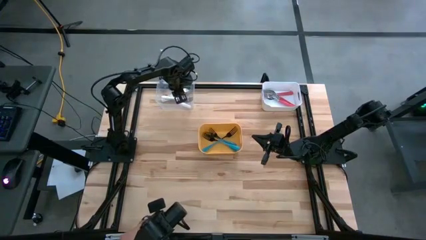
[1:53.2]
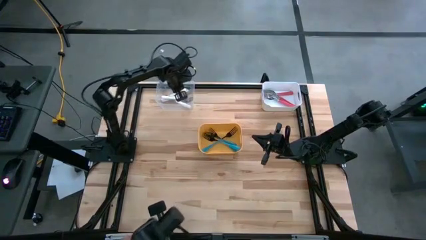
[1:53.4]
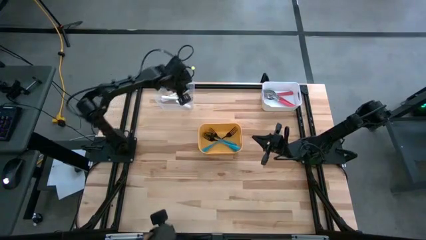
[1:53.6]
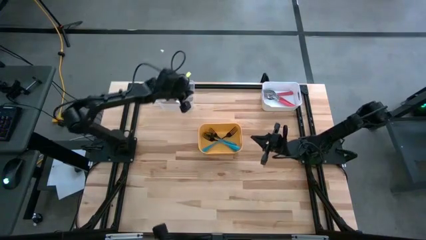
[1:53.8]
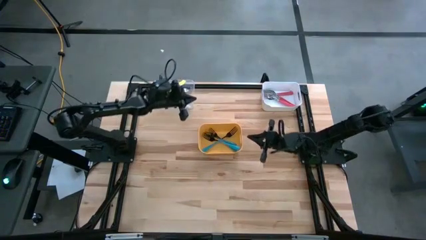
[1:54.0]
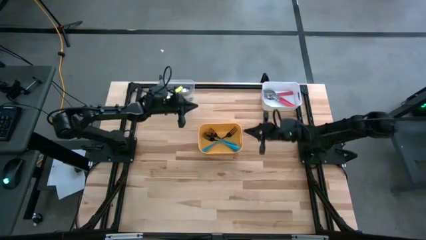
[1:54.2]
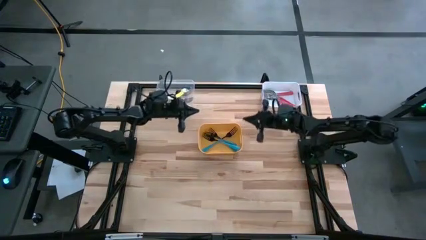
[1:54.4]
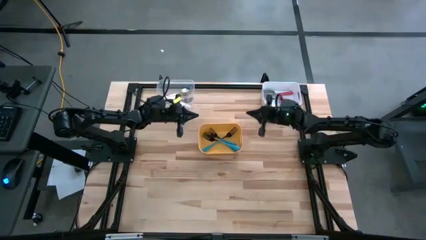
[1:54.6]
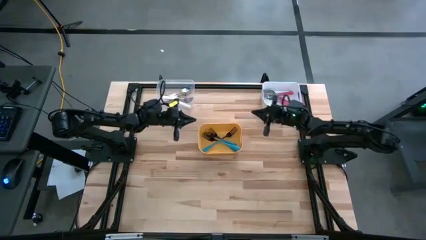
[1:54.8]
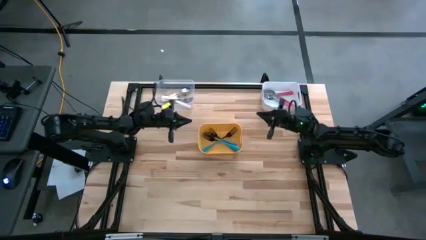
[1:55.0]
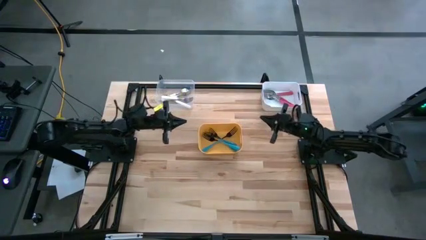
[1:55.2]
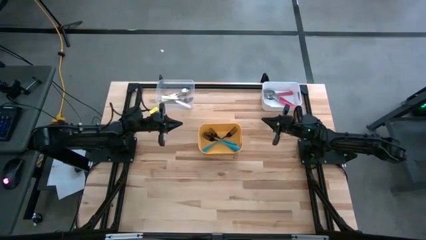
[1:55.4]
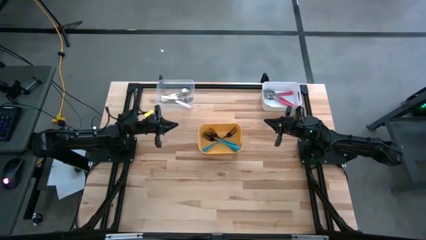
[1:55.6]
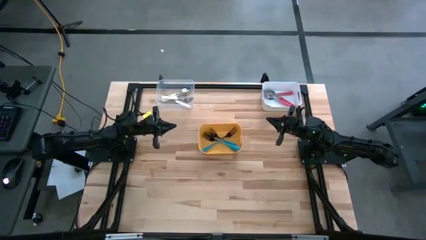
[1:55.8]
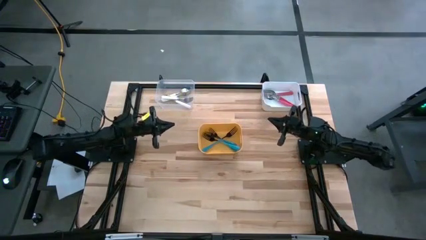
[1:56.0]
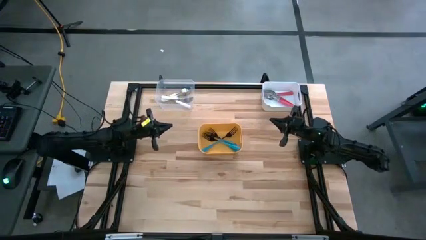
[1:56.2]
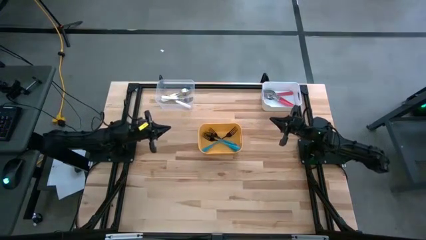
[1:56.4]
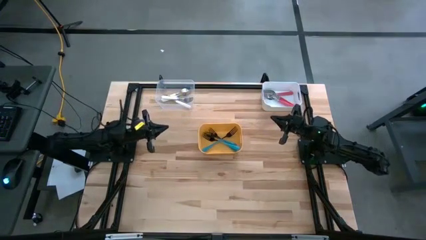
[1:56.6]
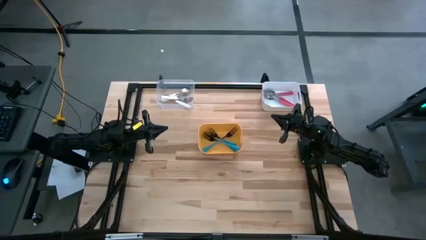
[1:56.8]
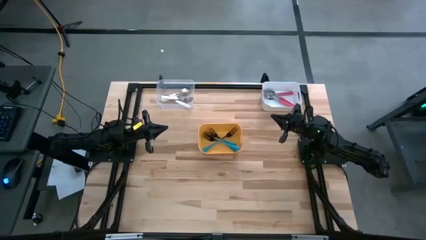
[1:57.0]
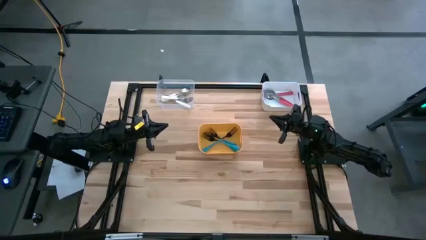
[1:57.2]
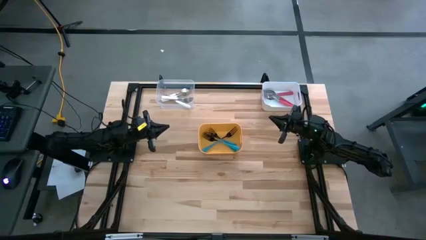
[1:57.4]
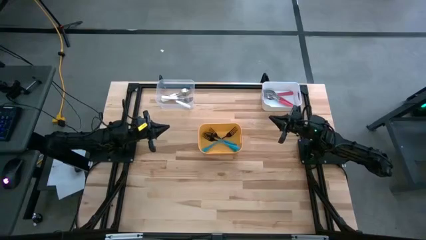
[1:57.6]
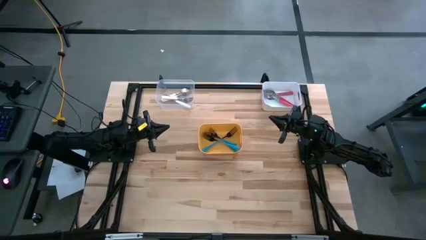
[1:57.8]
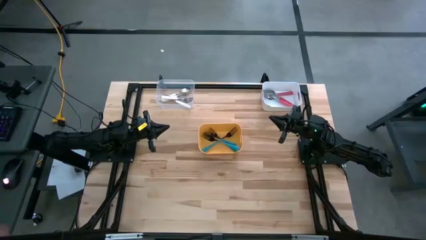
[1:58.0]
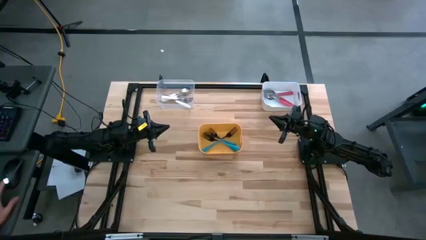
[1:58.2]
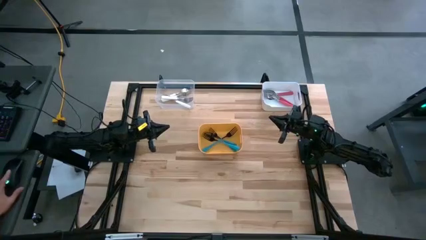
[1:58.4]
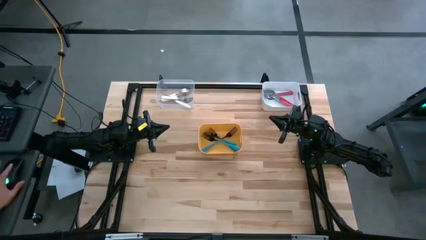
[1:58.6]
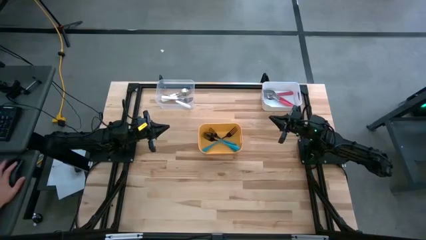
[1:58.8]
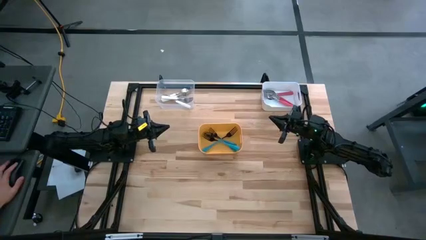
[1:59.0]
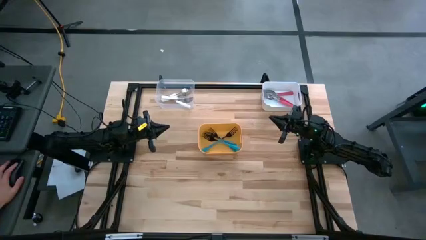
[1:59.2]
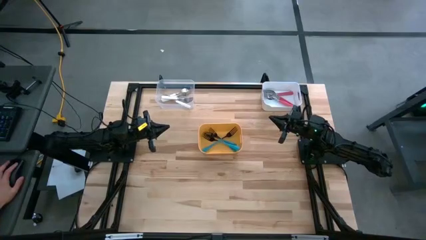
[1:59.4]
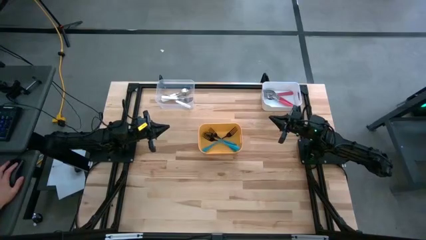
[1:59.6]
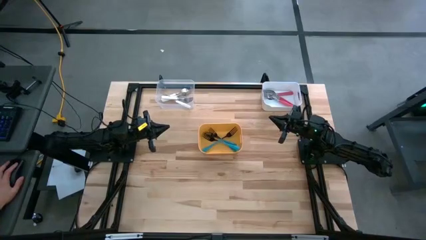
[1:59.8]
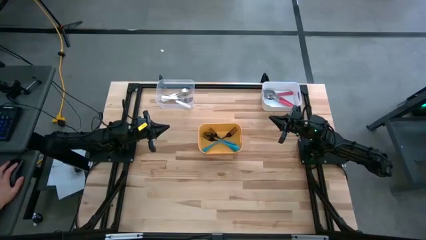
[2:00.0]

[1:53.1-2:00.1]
Task: Sort silverware by color (type)
Return to Home Position

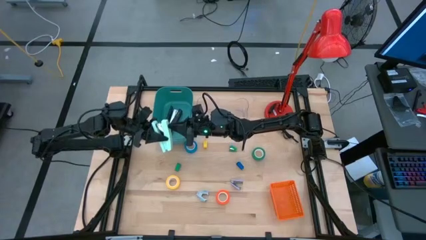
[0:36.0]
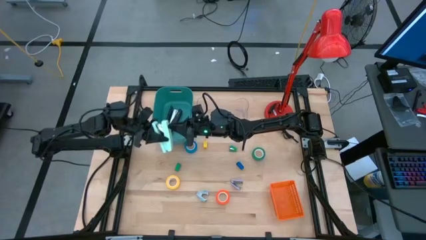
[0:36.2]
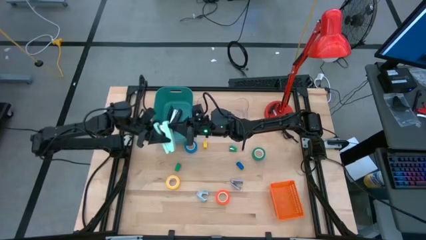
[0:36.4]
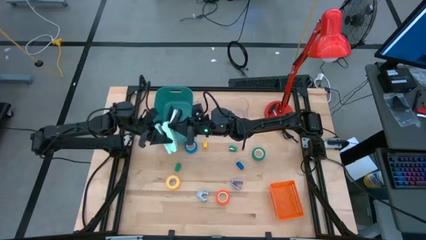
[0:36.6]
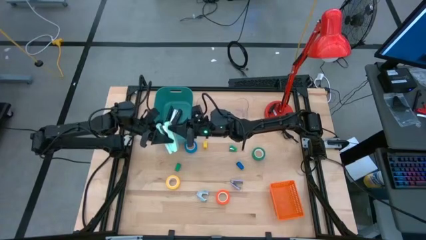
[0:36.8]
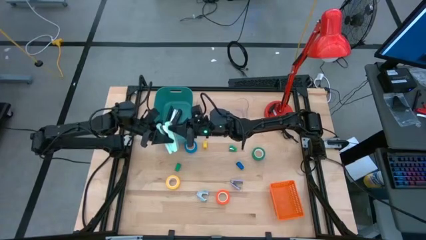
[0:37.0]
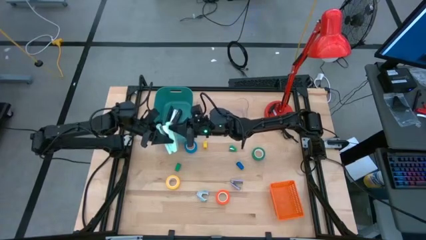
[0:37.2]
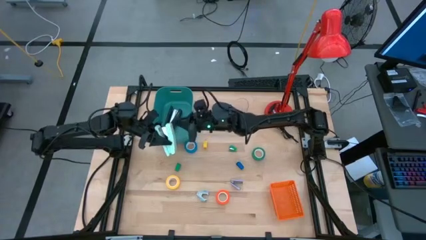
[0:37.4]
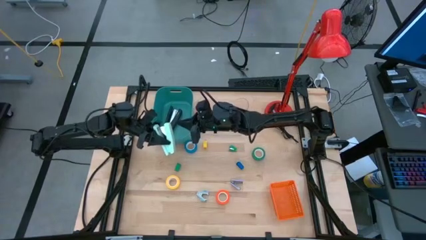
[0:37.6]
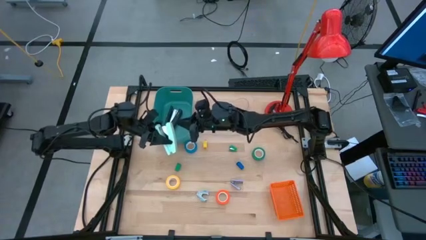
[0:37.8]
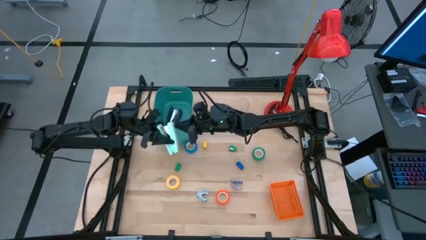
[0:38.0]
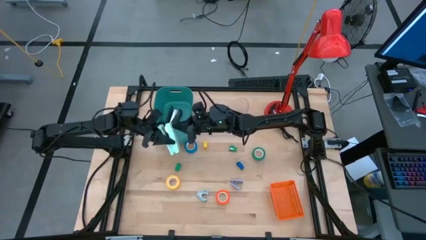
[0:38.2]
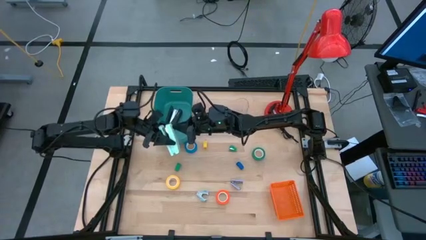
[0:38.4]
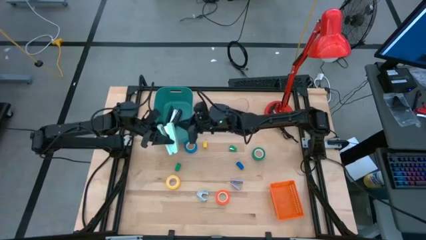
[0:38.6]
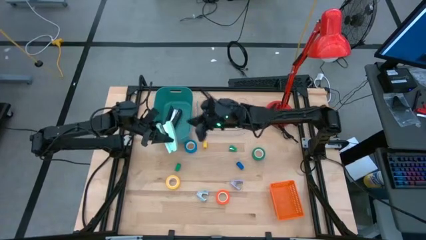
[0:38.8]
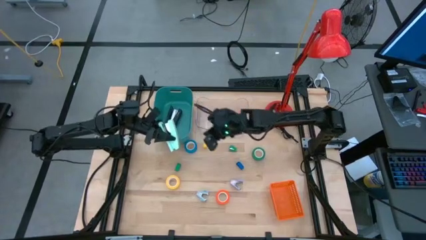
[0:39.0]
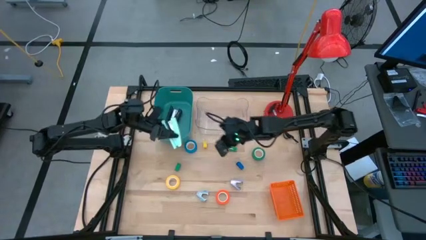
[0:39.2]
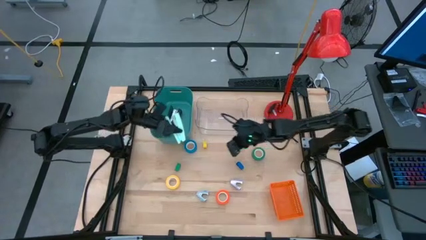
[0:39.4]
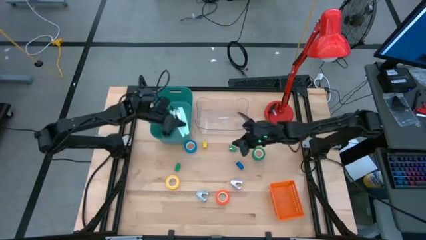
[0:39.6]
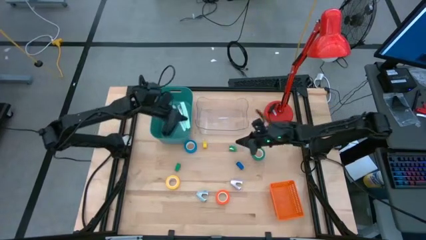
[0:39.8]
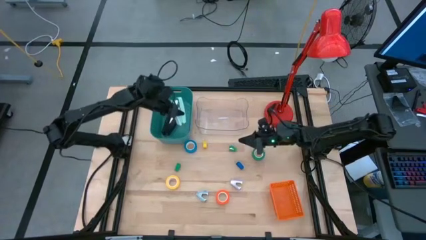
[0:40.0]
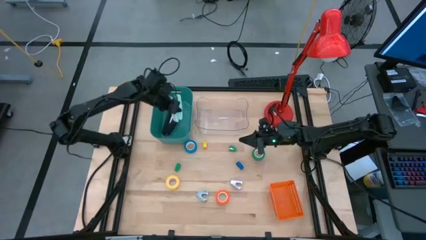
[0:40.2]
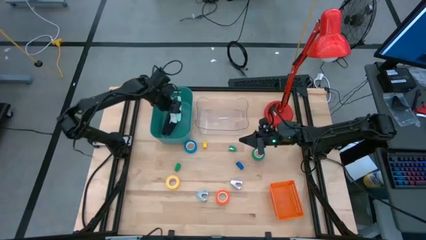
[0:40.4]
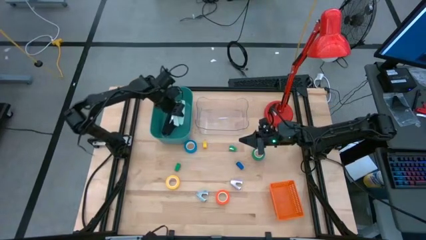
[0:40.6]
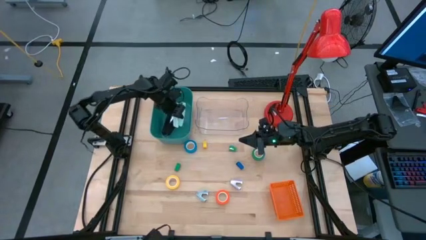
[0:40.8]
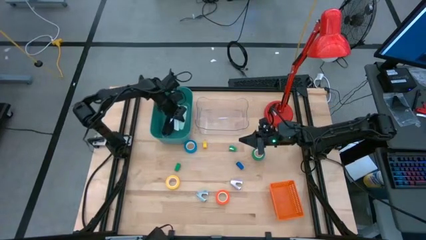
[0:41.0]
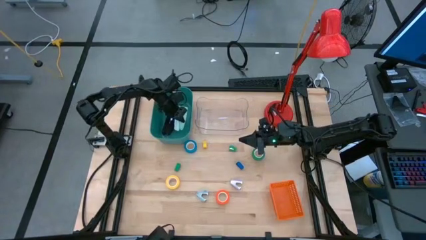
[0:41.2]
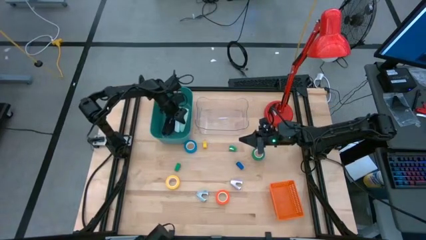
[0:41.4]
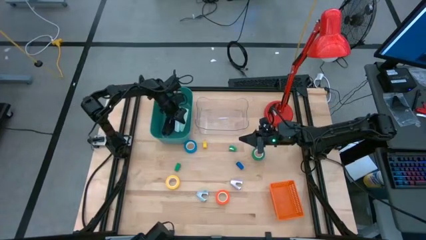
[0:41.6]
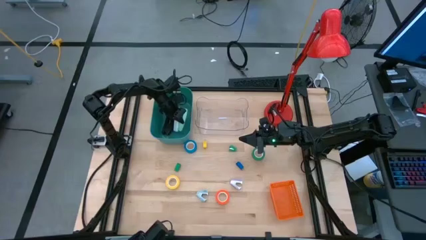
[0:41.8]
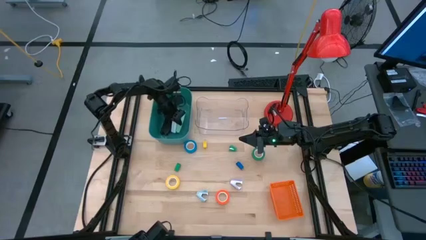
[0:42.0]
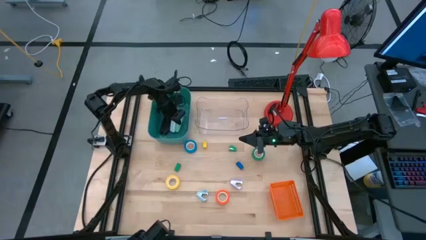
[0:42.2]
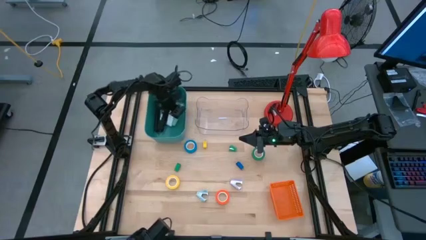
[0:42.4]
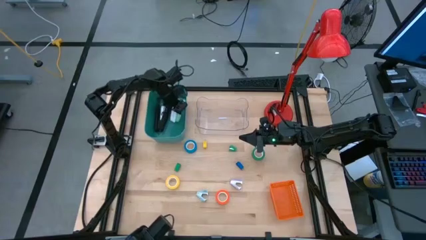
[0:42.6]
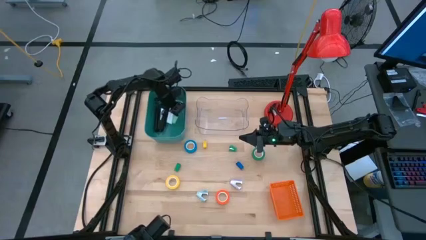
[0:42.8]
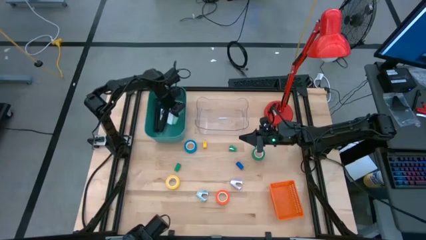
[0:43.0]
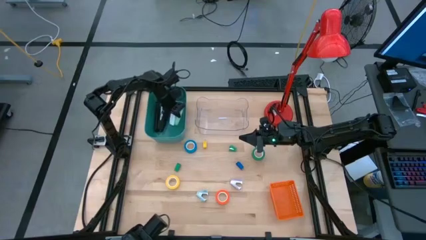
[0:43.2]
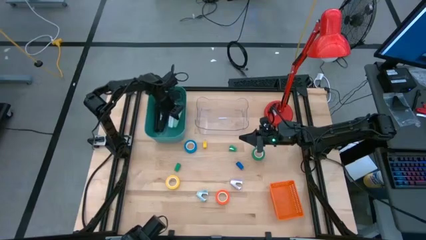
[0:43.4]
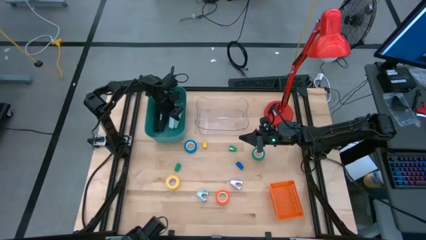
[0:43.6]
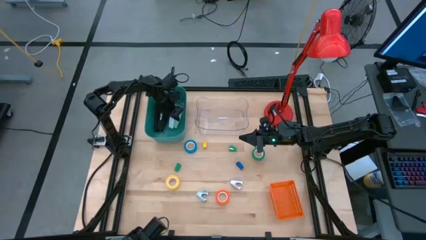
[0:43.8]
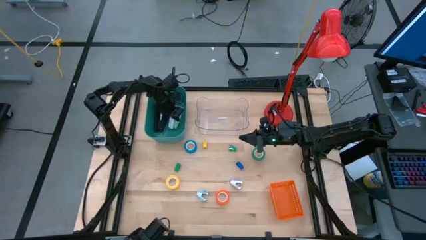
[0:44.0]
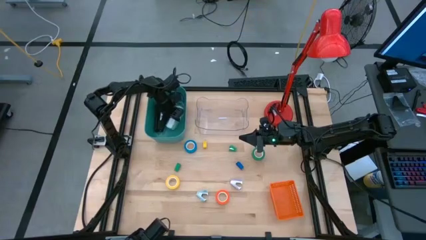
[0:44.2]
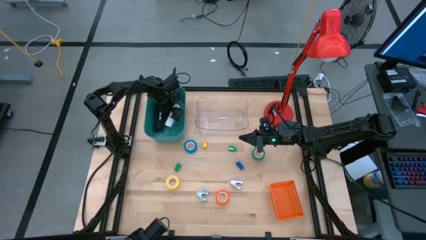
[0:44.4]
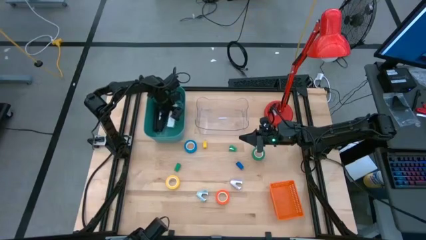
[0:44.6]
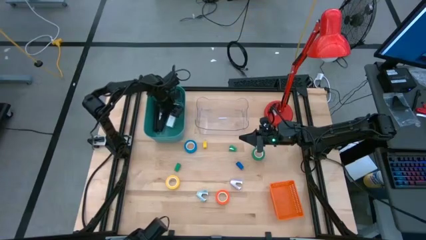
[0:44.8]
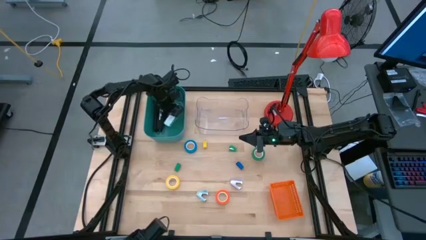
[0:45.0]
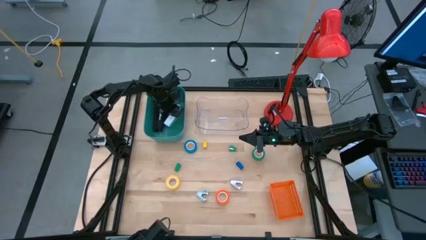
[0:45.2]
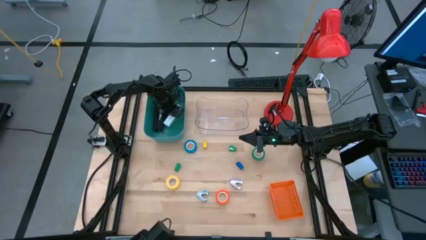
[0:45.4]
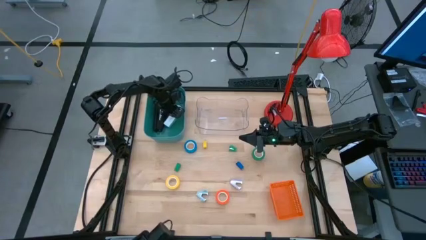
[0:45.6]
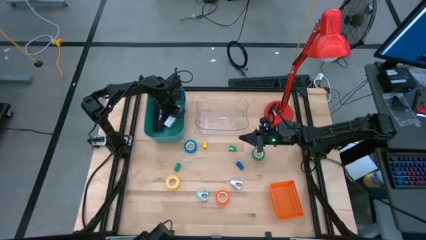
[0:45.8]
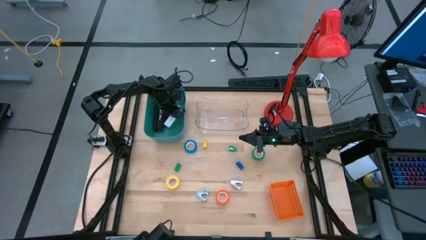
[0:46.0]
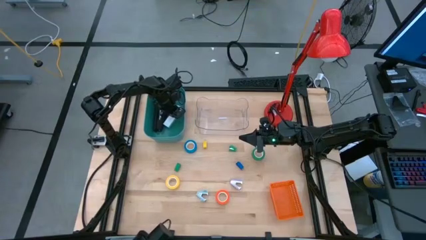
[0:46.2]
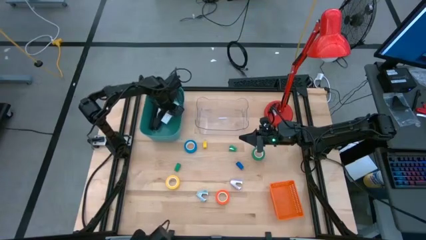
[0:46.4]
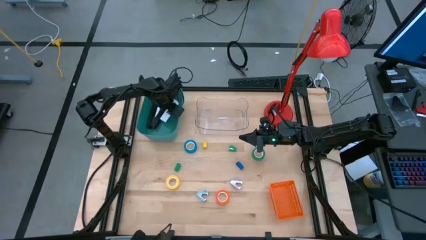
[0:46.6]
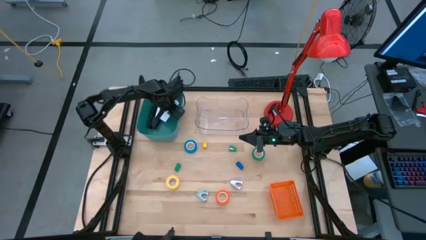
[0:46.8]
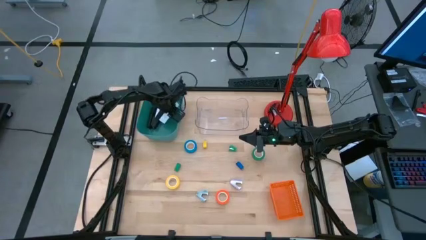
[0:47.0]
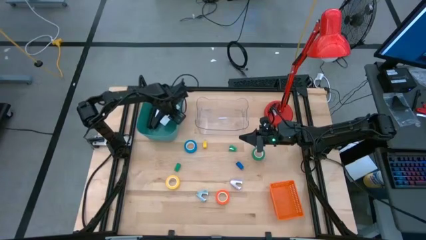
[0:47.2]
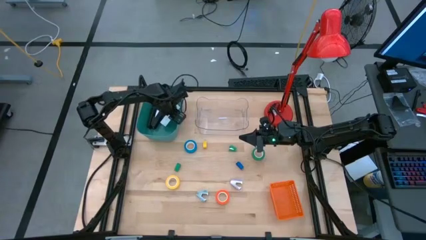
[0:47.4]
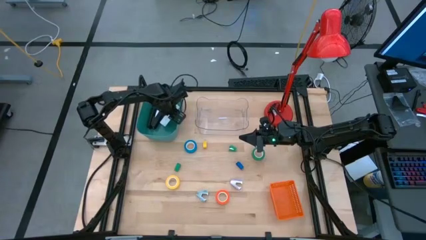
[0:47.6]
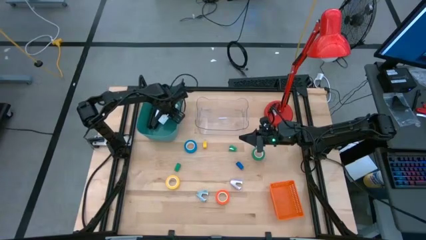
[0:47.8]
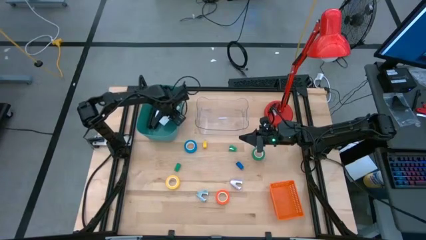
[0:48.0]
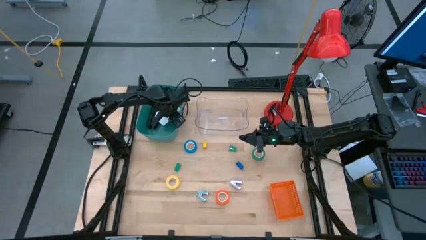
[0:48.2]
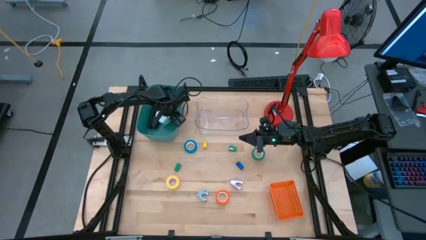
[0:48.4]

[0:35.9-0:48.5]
Task: Pick and place Stapler, Stapler remover, tape
Put the light green stapler into the green bin
